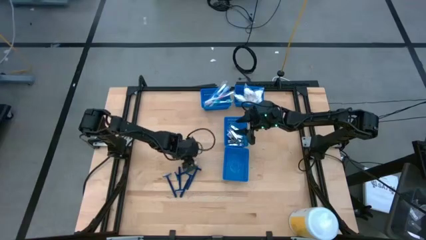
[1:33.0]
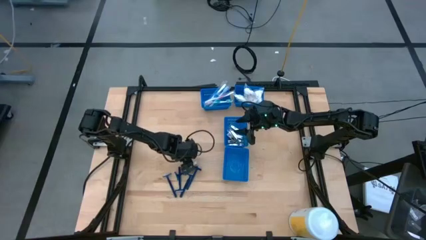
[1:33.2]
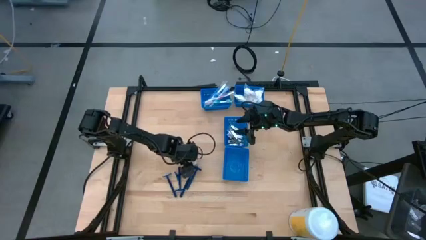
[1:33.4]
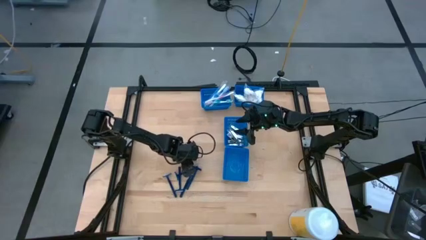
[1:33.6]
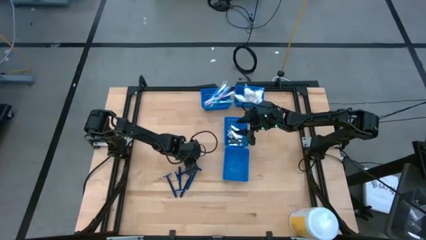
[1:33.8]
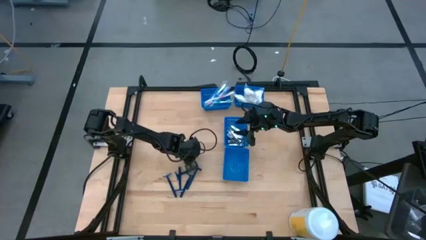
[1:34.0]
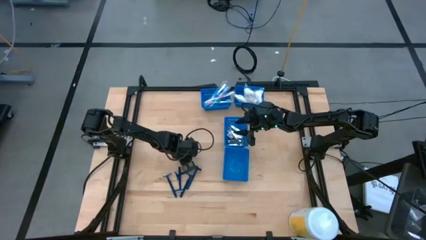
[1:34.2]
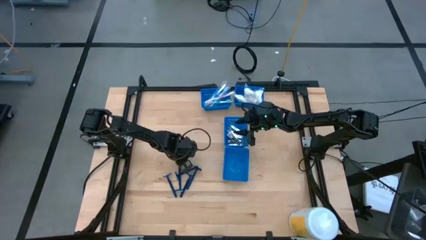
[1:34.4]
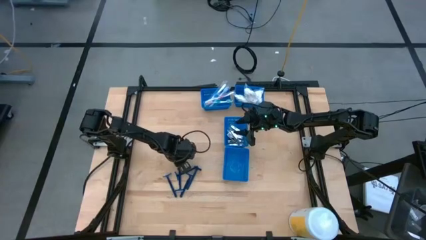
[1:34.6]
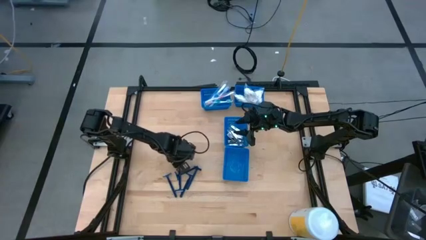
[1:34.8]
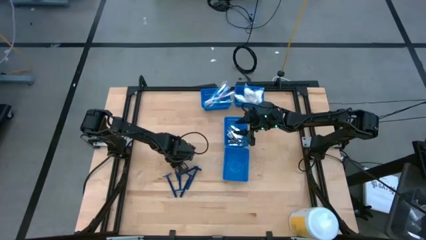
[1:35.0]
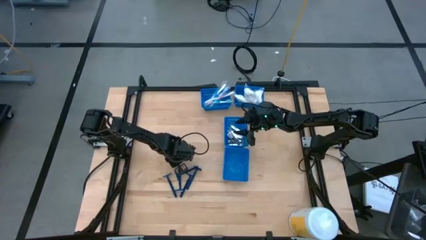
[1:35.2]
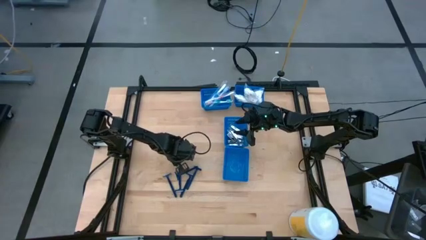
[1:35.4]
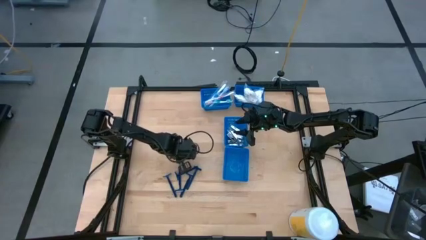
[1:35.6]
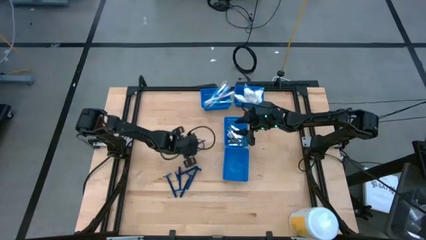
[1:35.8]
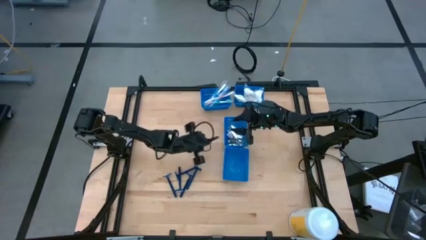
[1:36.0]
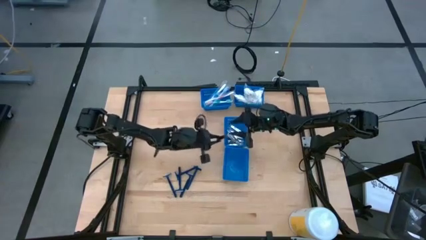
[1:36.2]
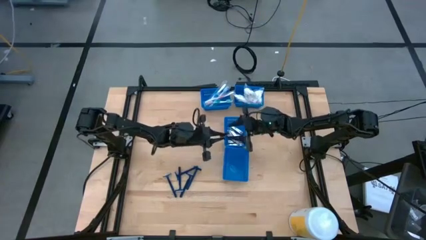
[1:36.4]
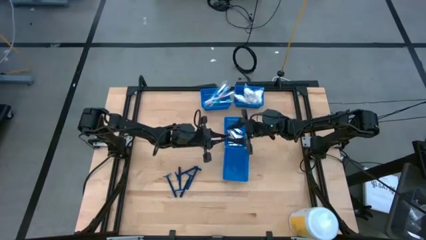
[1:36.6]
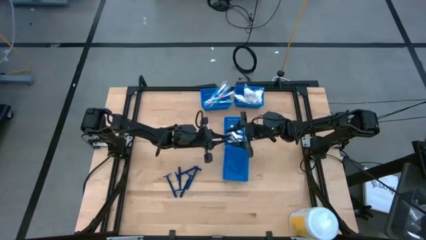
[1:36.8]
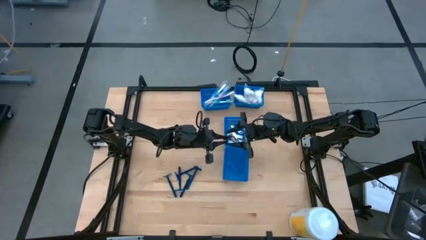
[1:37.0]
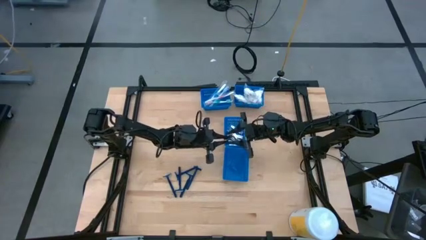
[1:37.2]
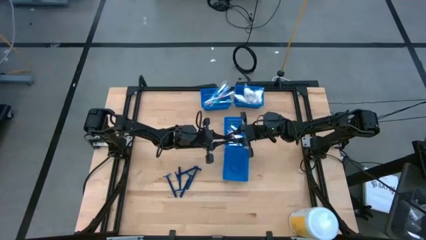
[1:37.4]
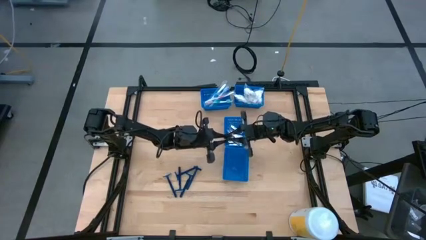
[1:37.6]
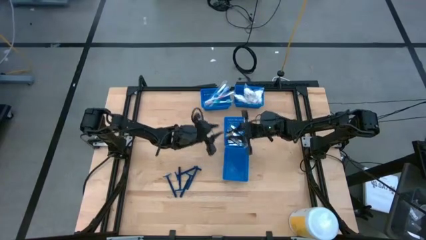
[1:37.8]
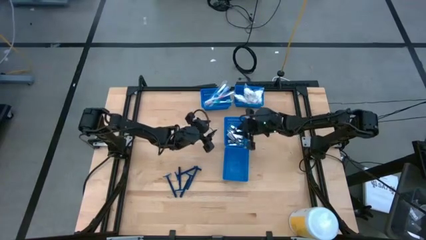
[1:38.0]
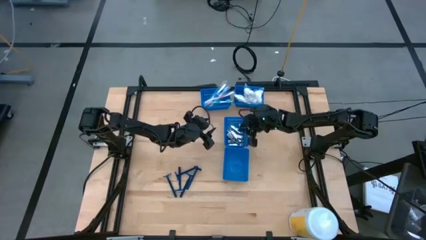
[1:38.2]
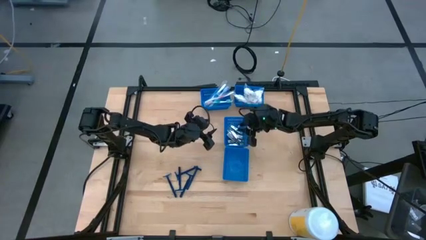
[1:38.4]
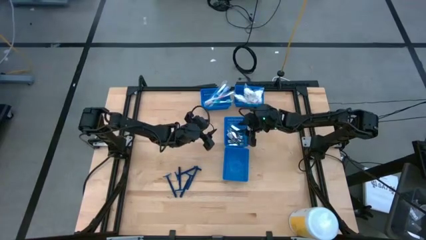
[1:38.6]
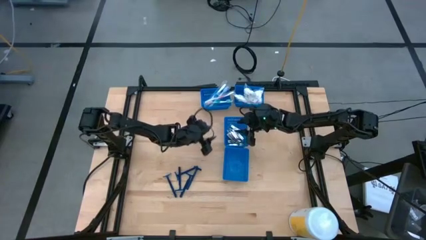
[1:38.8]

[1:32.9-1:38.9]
Task: Pick & Place Travel size toiletries
Put the nail clipper into the center blue bin

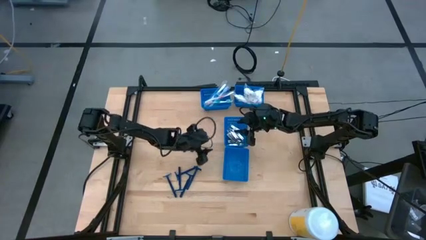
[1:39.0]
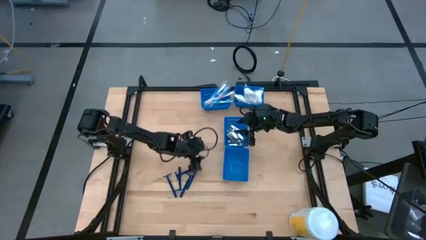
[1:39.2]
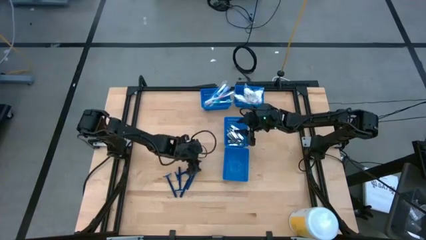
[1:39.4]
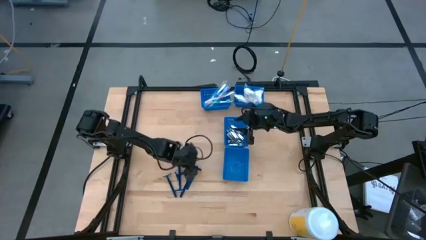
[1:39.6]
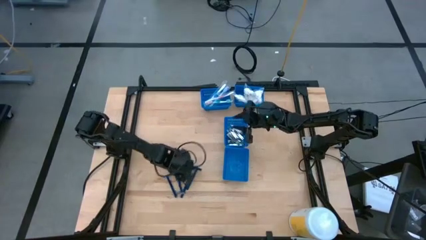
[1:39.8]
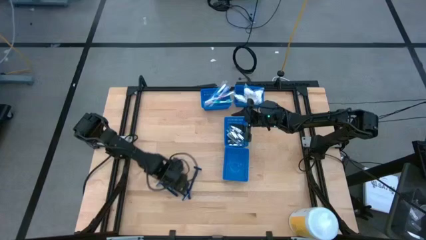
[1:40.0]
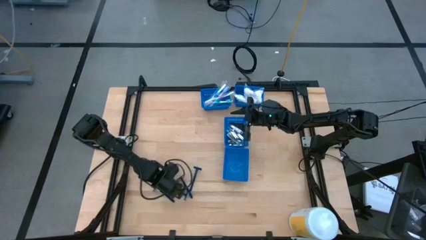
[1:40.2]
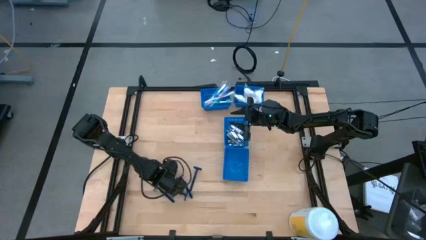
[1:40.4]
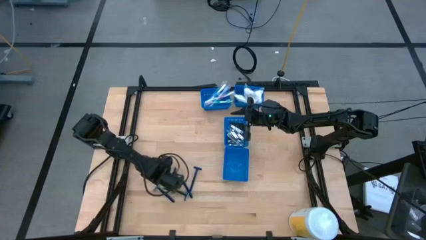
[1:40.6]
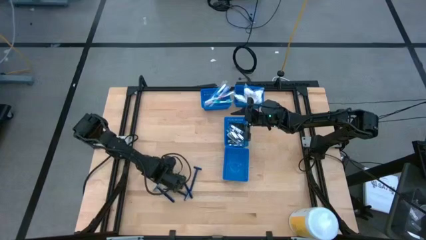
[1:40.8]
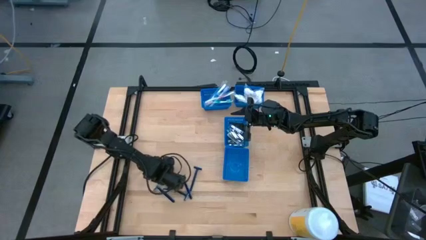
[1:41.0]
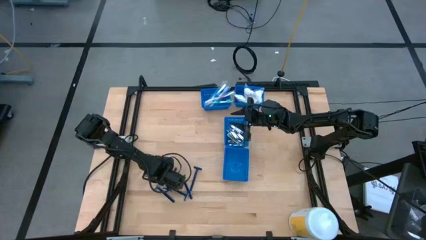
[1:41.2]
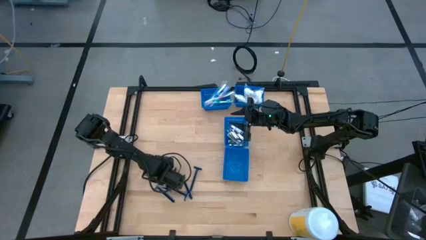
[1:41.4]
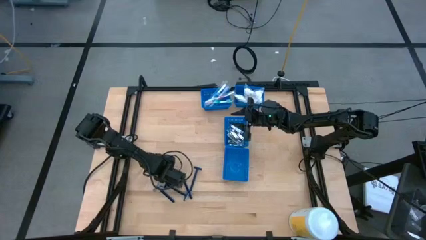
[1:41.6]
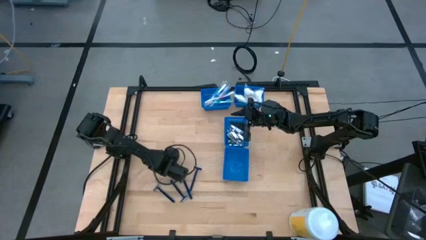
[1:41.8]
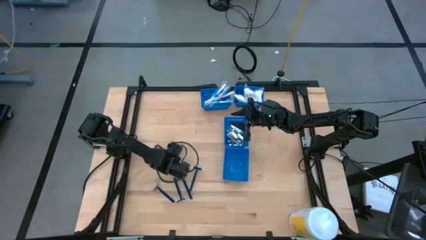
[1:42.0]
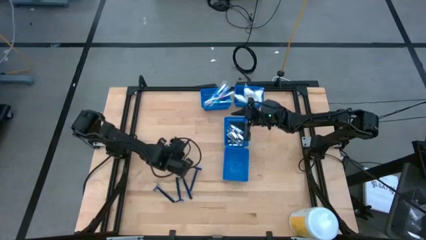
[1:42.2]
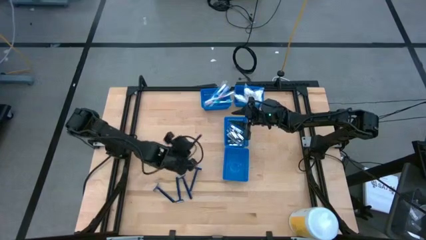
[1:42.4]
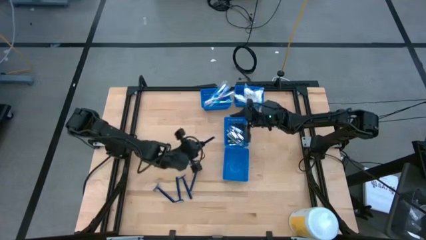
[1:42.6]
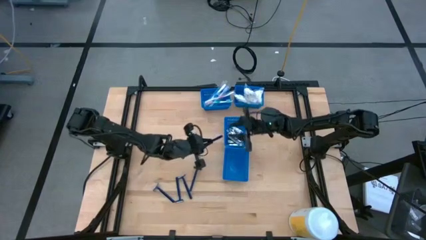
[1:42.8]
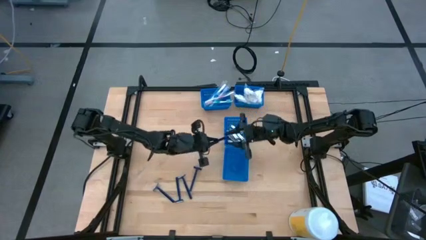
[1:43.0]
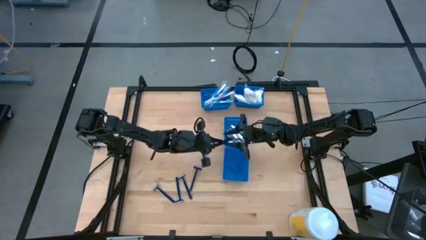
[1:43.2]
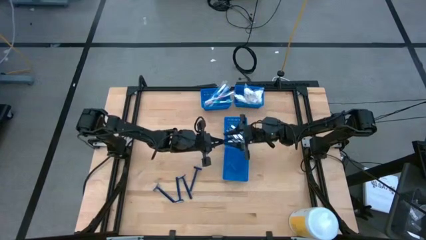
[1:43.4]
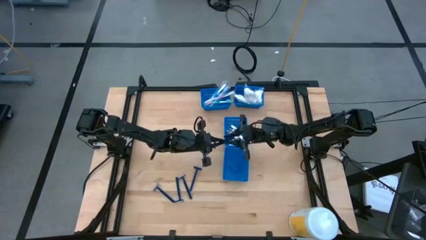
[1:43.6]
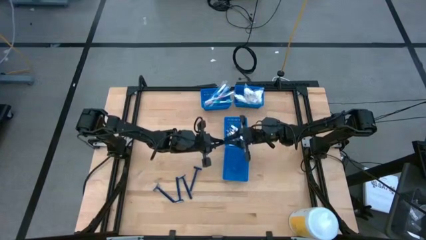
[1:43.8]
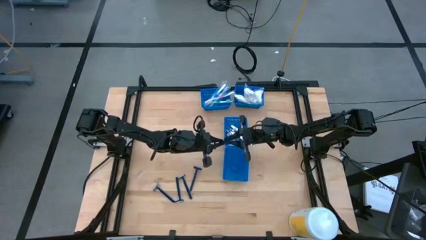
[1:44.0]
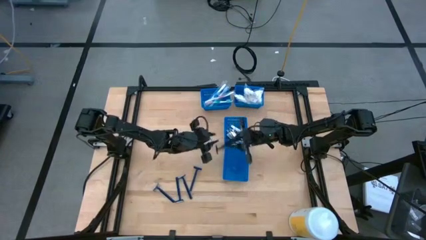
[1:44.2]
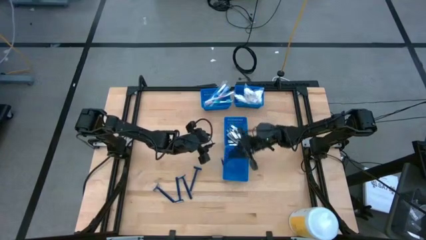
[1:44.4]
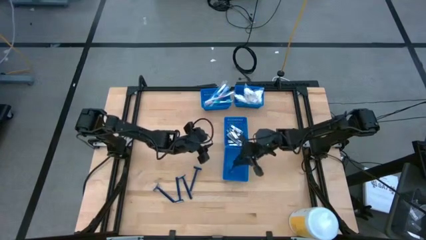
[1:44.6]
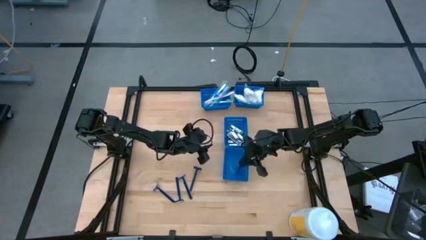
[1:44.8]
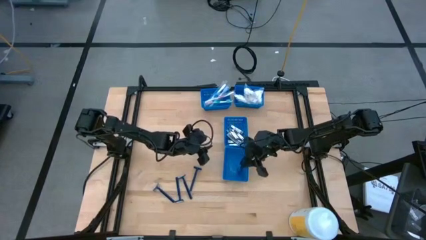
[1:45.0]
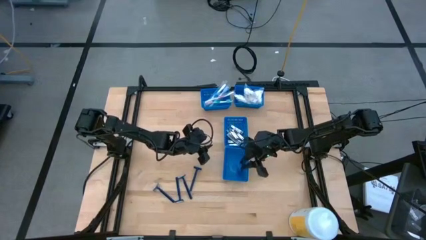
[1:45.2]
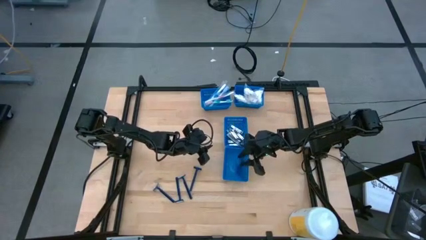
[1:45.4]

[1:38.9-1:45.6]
Put the blue safety razor in the bottom blue bin

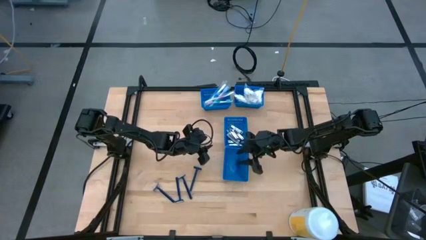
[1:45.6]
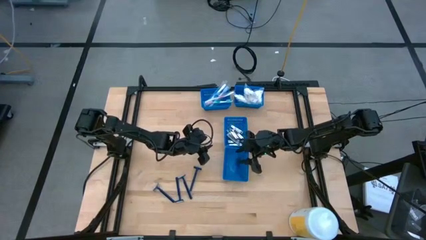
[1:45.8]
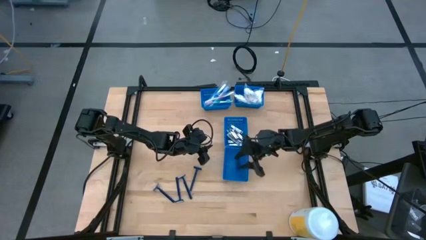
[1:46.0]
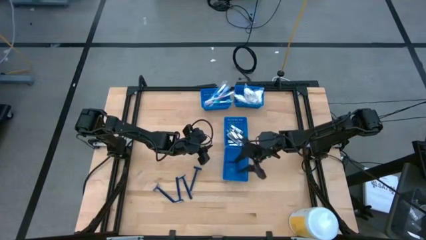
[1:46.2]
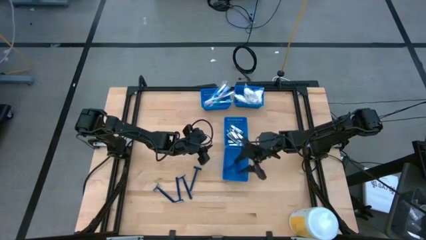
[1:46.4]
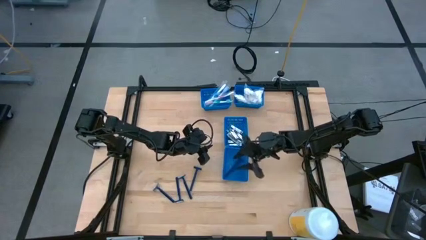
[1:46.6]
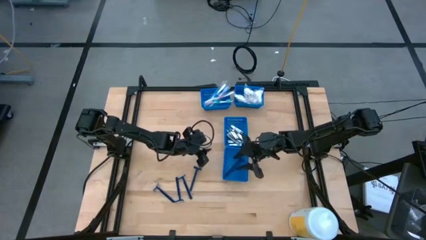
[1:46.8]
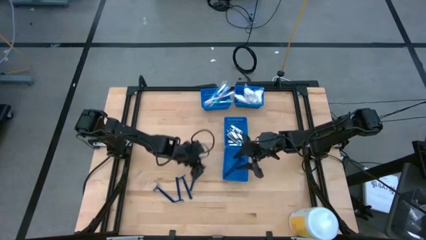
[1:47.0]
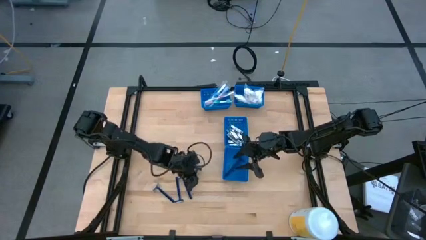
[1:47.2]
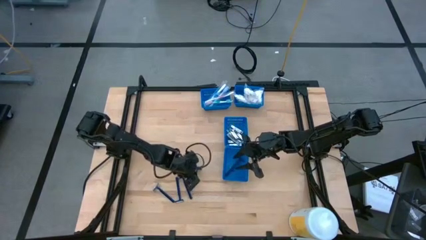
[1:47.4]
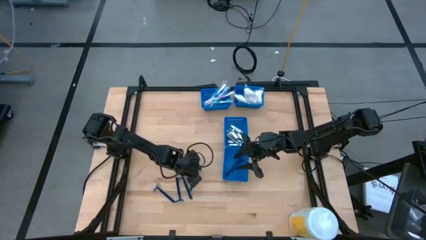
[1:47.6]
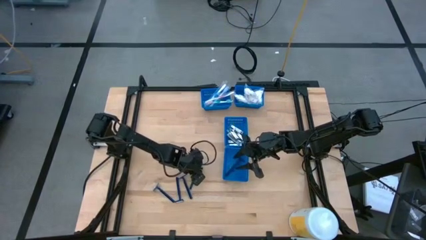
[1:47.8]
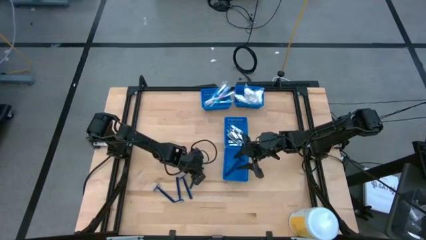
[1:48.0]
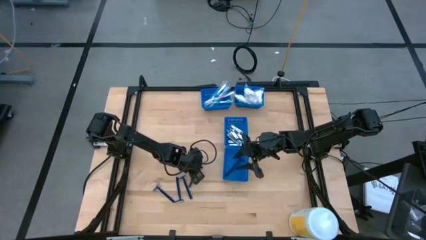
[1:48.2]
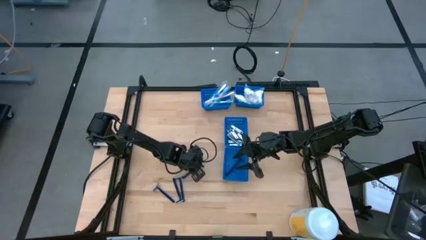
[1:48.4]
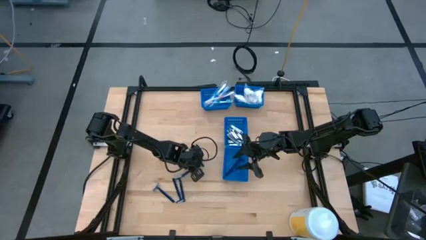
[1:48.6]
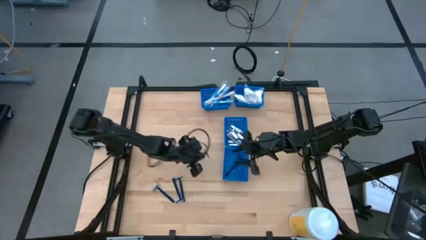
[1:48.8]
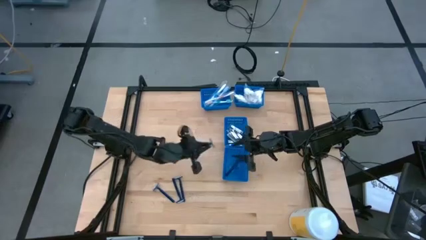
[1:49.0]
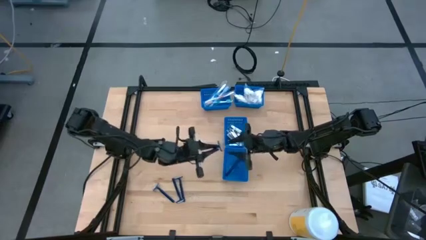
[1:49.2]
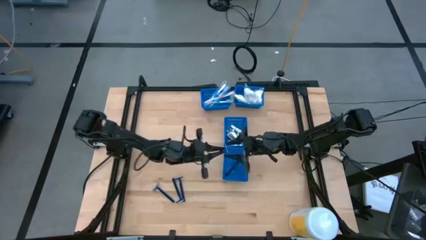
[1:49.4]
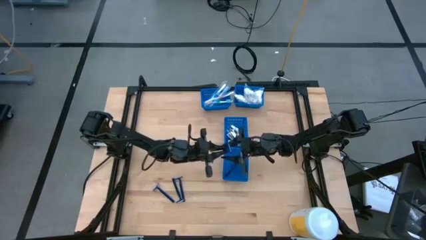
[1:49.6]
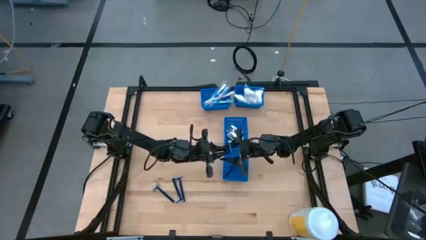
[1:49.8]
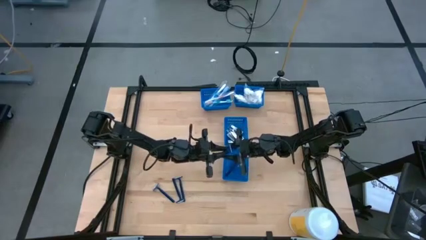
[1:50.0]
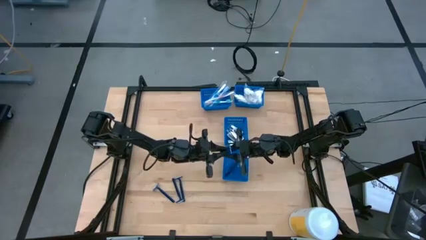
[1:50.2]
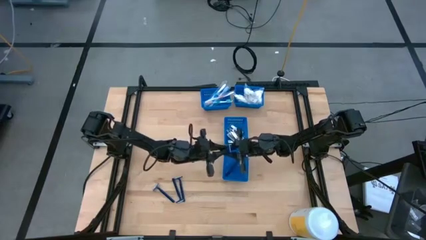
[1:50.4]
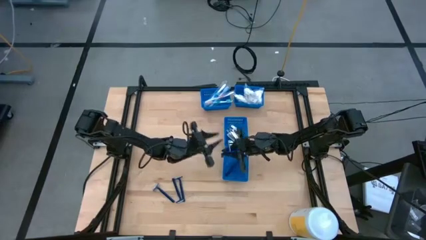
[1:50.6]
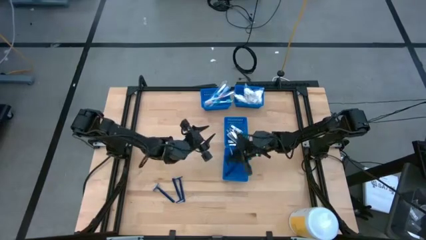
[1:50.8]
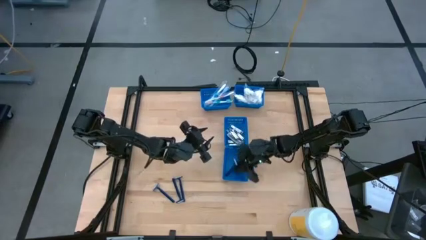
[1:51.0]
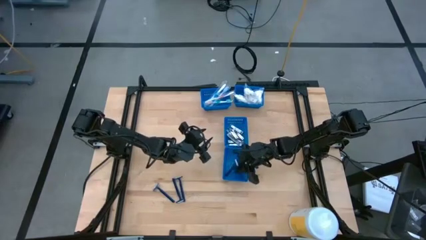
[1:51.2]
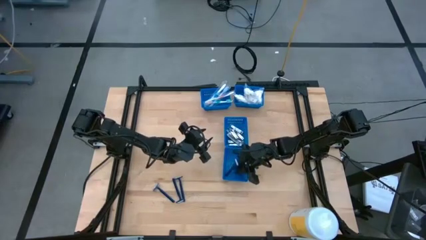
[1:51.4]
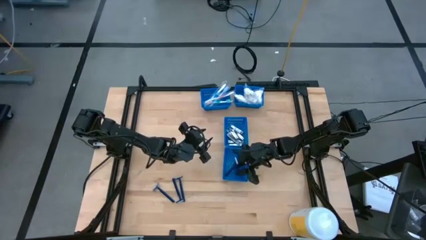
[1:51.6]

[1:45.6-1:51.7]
Put the blue safety razor in the bottom blue bin
